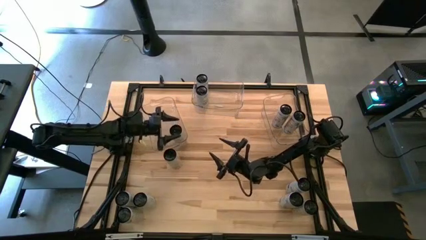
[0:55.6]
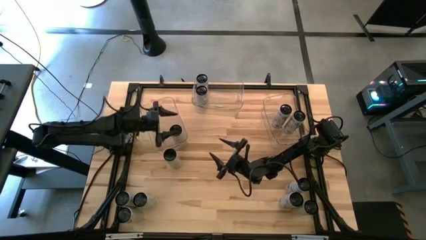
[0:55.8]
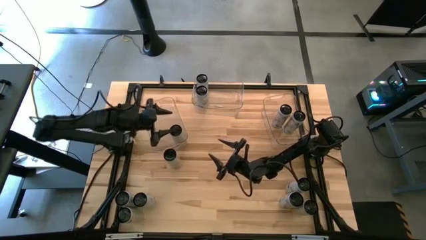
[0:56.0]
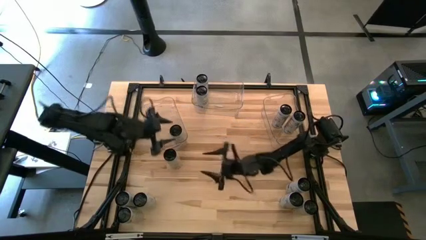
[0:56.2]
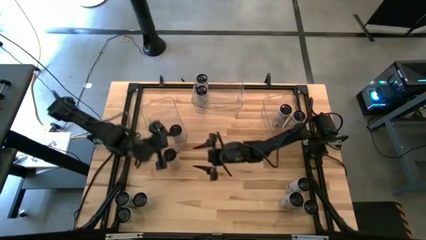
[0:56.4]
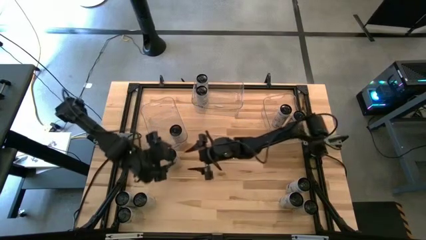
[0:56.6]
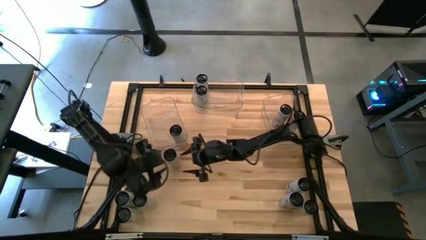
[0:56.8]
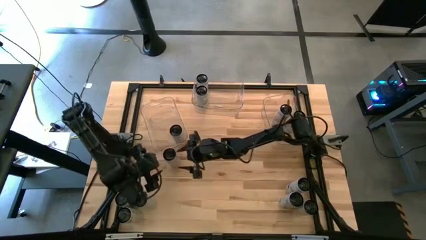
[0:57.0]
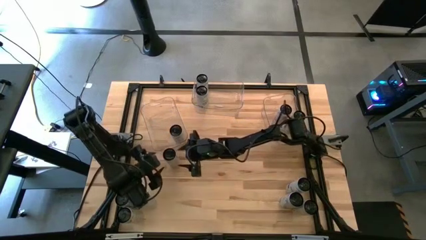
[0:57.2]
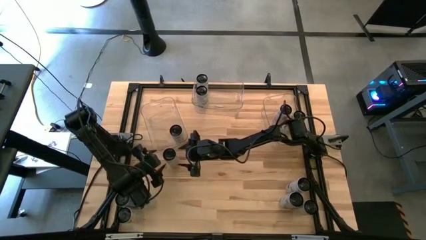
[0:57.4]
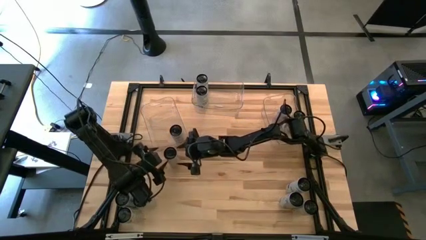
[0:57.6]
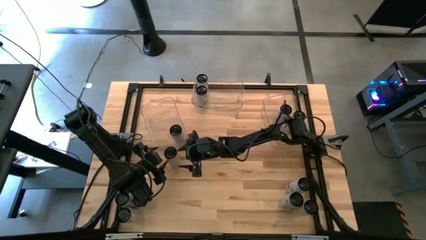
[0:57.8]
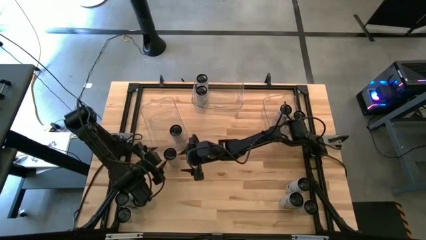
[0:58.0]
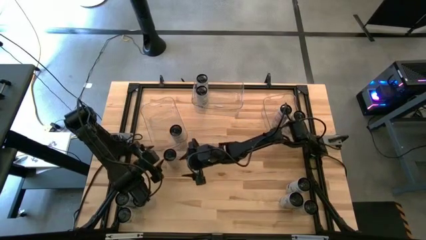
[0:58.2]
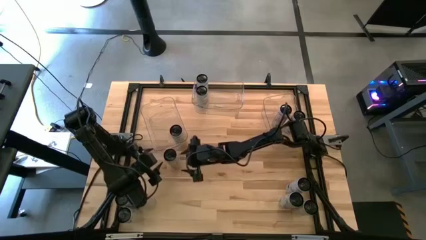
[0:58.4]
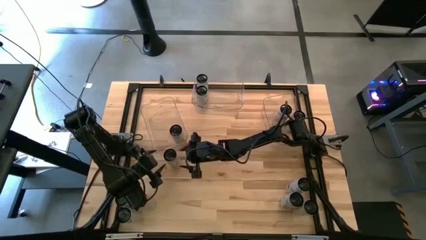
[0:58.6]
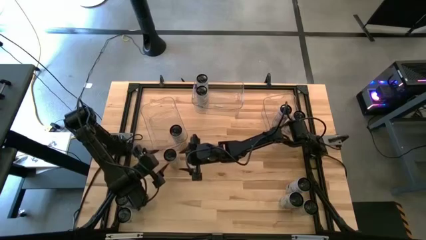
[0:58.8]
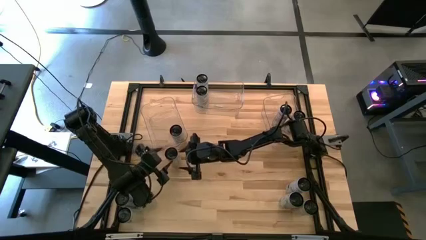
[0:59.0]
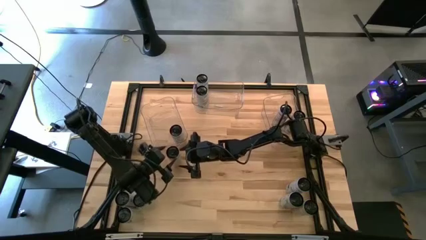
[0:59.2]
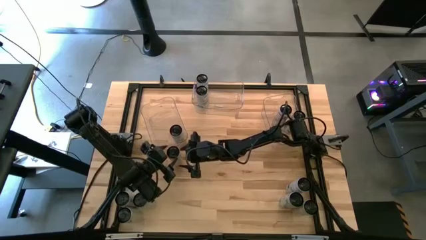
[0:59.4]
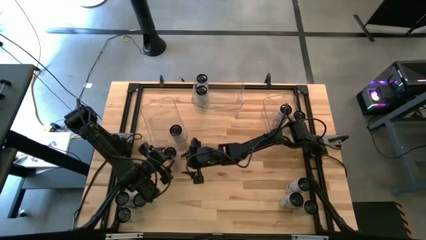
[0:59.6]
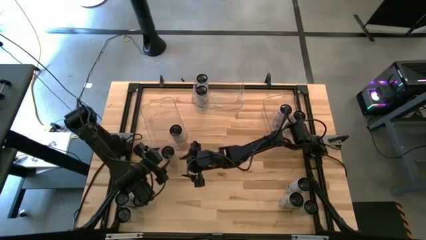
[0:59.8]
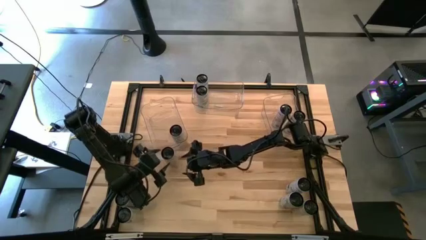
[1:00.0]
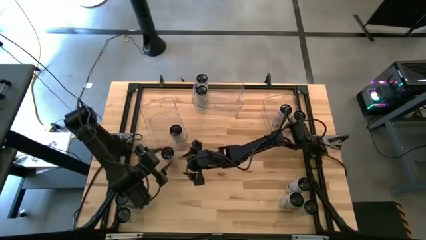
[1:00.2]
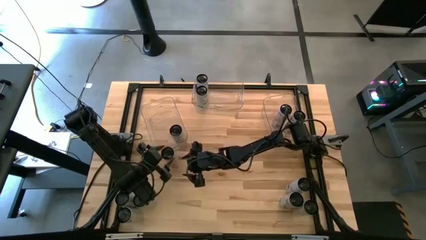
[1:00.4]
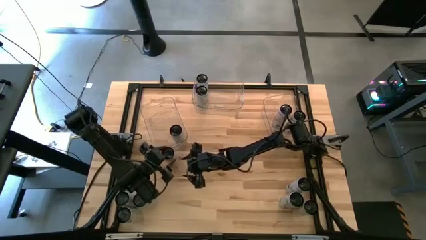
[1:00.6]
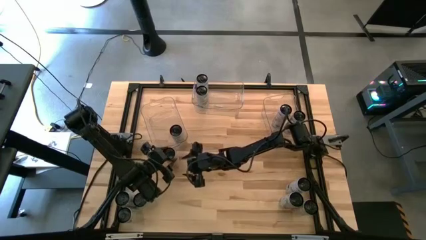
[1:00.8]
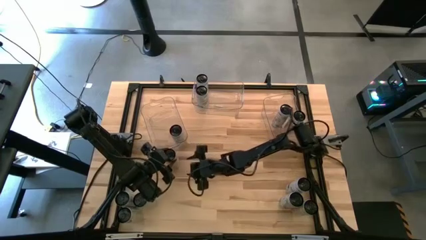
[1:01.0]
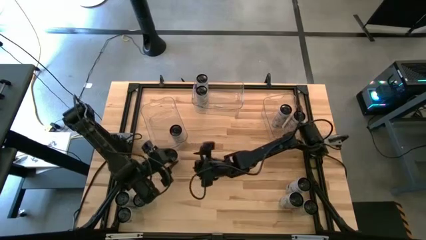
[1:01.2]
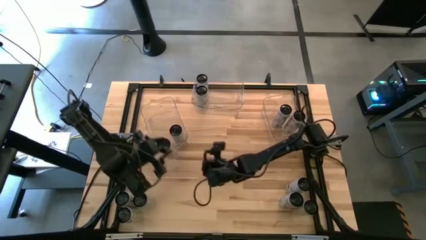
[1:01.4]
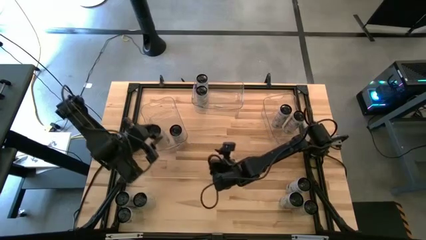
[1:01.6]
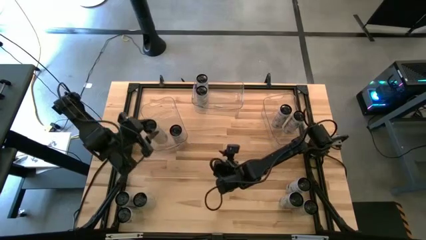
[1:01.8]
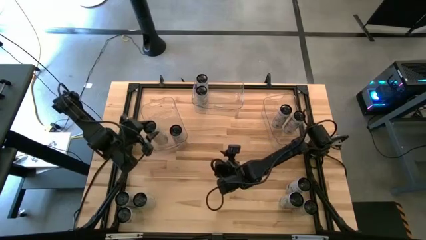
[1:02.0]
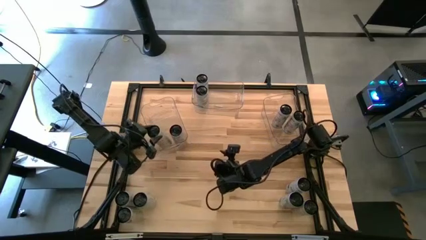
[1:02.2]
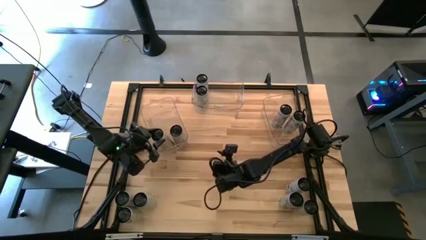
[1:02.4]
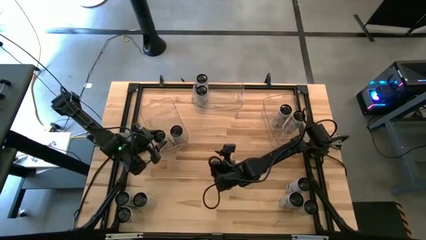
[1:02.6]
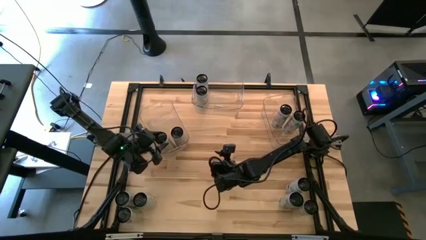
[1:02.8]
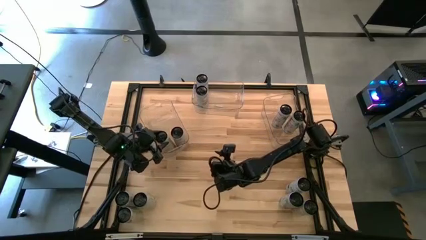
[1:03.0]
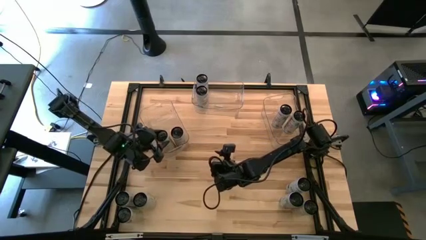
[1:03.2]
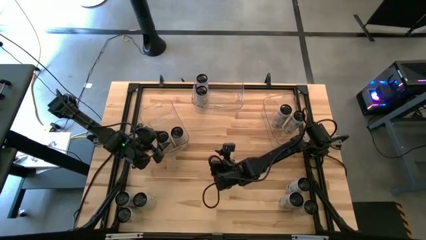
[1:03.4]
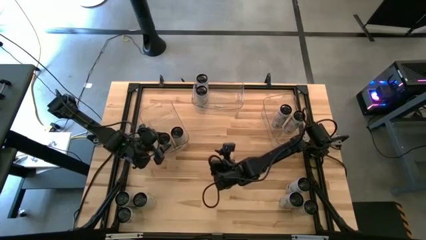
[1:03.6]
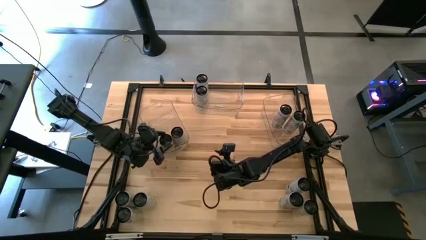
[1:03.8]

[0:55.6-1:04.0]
Task: Sort soda cans
Put the white/yellow soda can into the left transparent bin

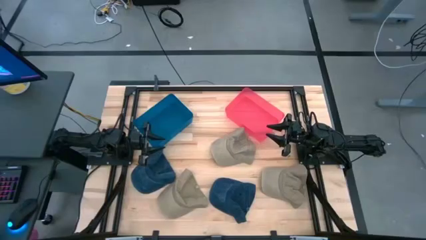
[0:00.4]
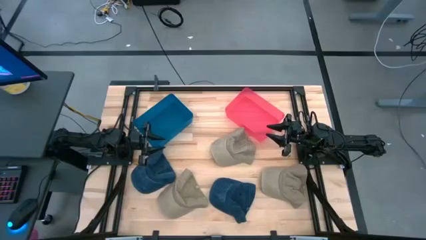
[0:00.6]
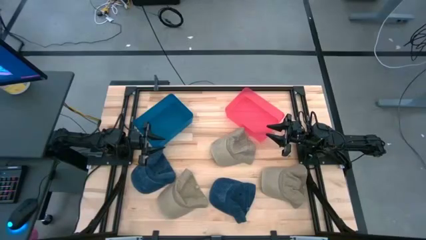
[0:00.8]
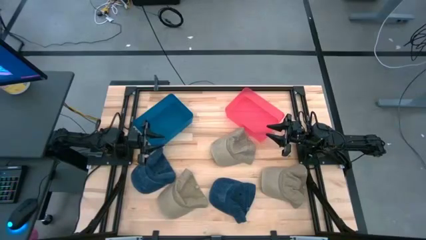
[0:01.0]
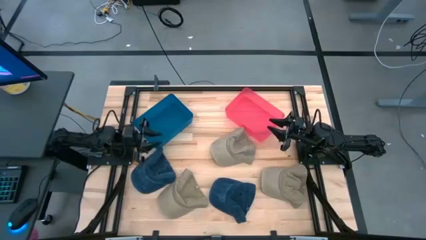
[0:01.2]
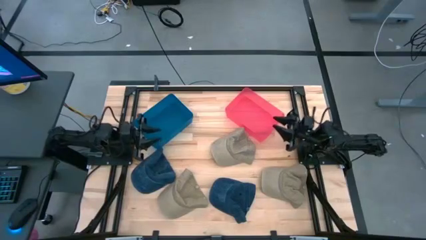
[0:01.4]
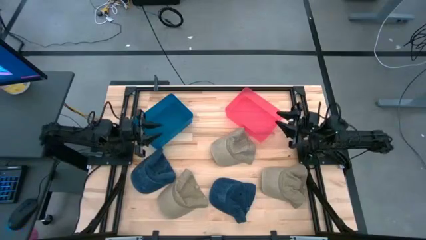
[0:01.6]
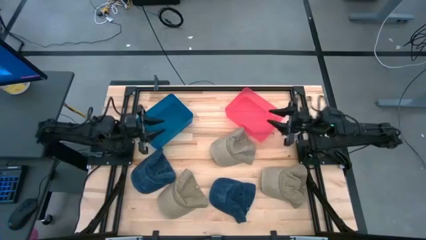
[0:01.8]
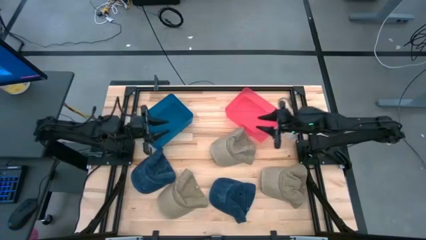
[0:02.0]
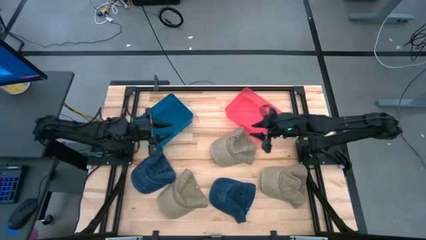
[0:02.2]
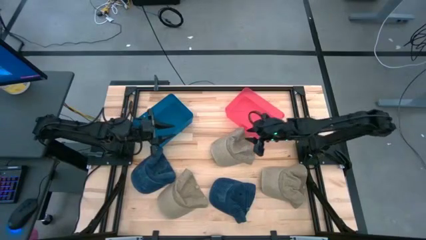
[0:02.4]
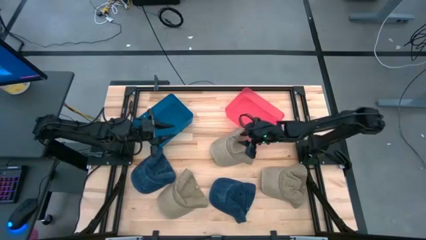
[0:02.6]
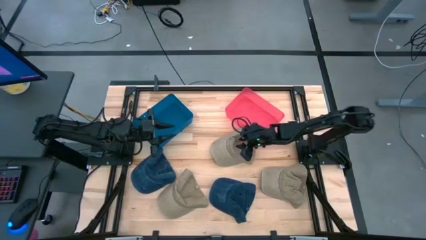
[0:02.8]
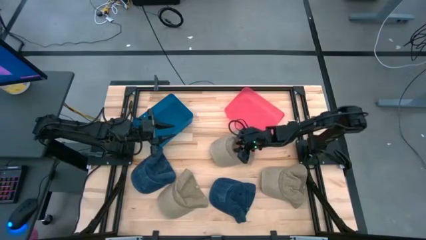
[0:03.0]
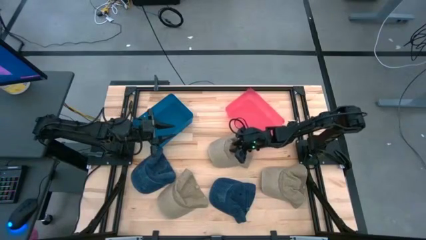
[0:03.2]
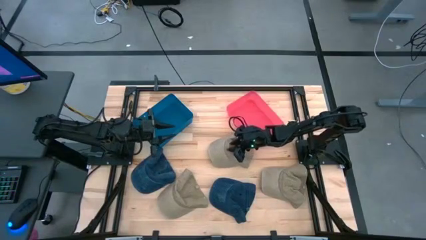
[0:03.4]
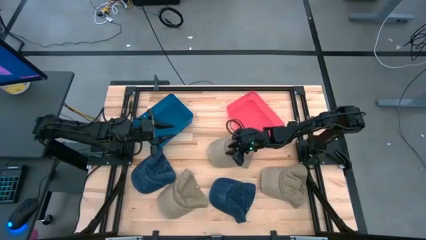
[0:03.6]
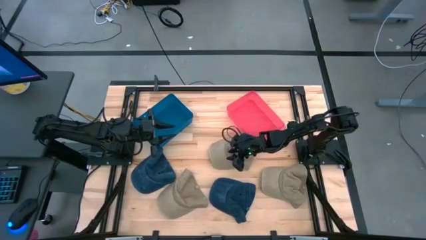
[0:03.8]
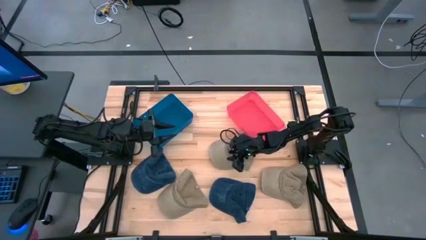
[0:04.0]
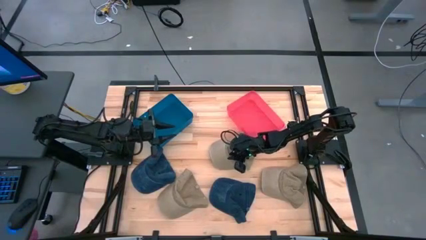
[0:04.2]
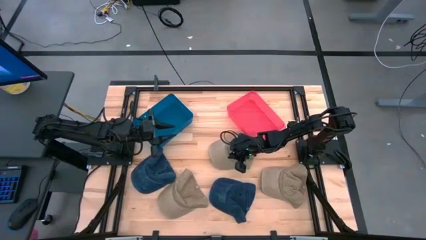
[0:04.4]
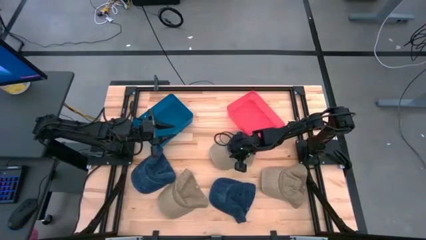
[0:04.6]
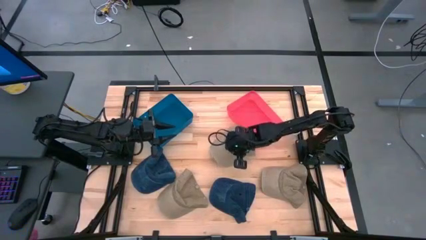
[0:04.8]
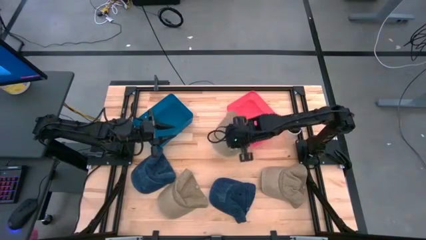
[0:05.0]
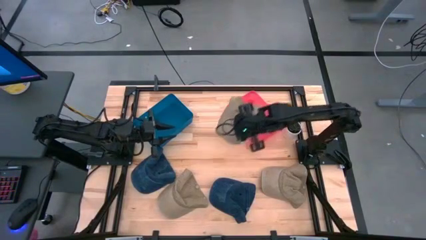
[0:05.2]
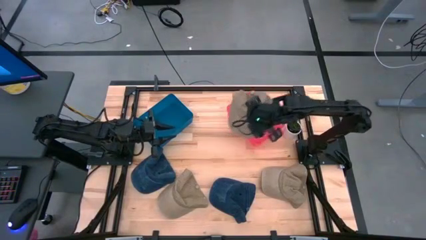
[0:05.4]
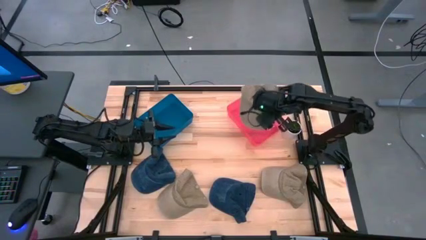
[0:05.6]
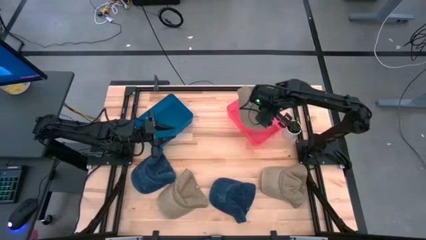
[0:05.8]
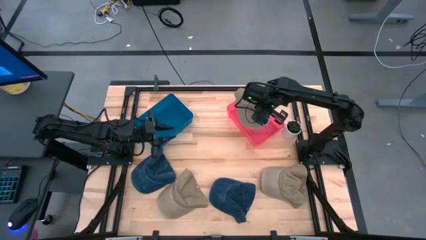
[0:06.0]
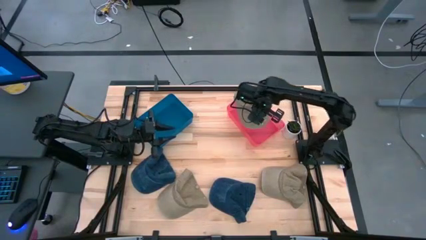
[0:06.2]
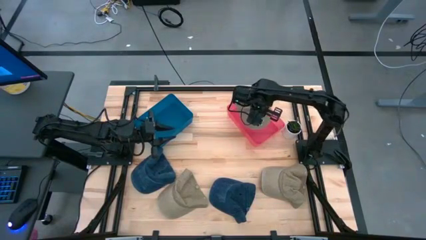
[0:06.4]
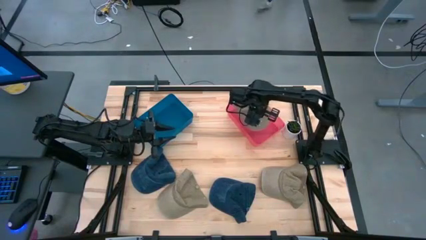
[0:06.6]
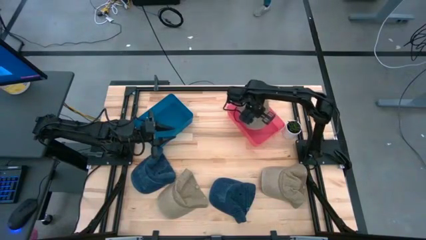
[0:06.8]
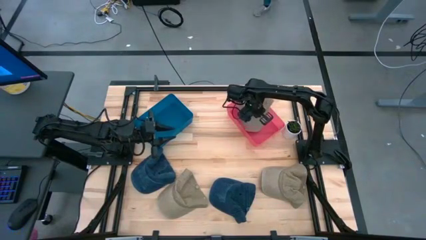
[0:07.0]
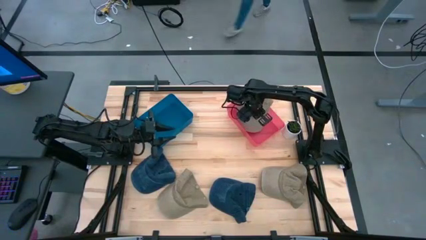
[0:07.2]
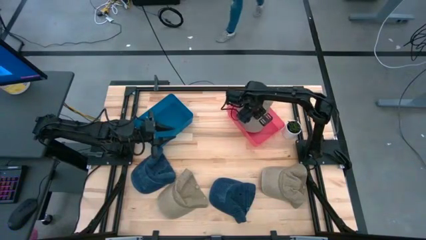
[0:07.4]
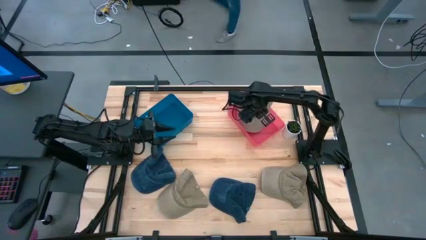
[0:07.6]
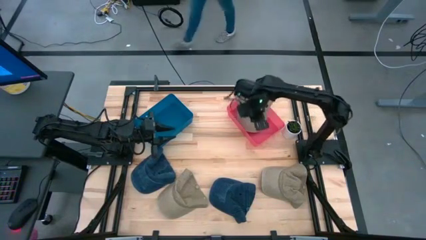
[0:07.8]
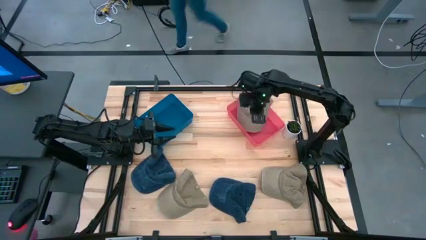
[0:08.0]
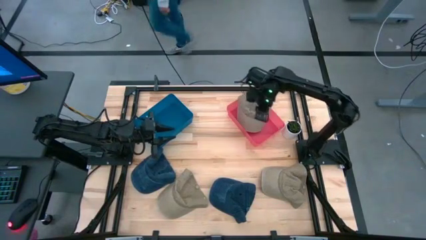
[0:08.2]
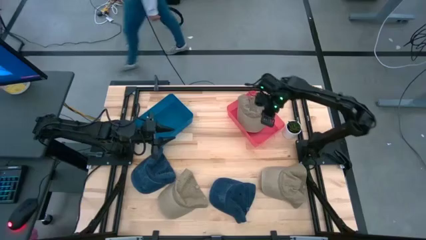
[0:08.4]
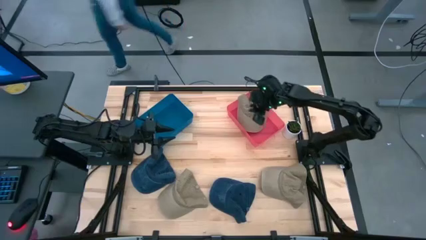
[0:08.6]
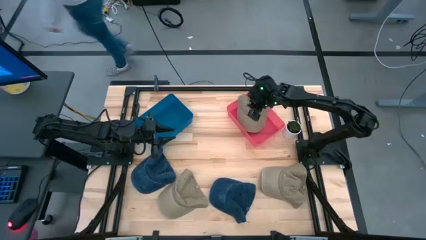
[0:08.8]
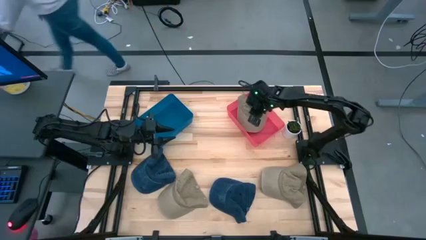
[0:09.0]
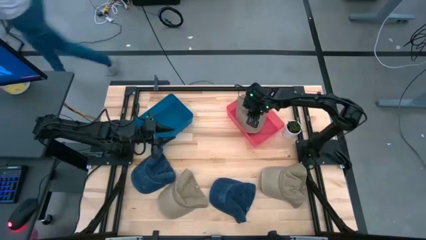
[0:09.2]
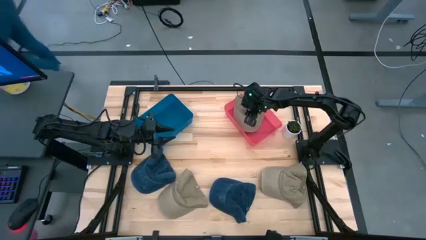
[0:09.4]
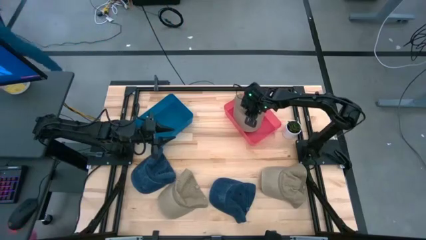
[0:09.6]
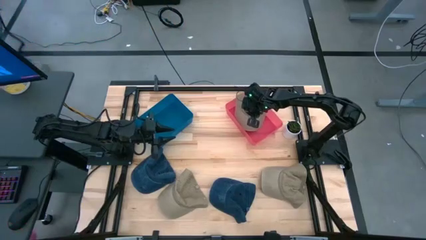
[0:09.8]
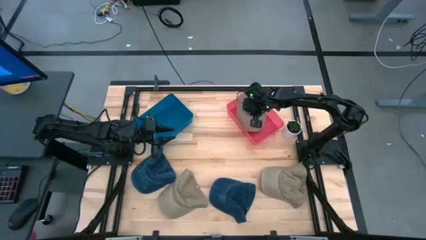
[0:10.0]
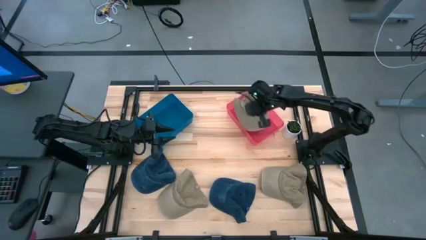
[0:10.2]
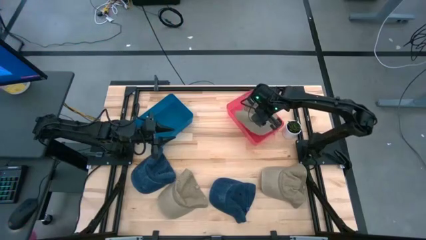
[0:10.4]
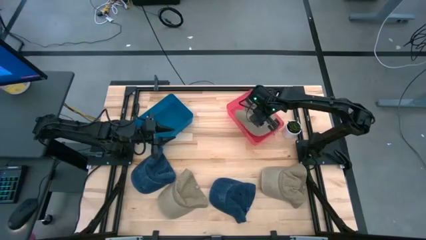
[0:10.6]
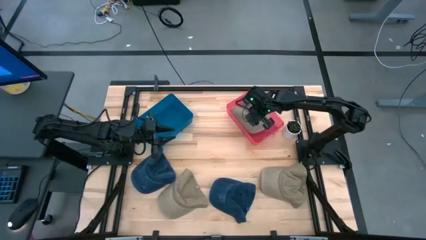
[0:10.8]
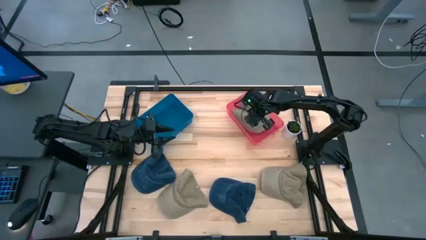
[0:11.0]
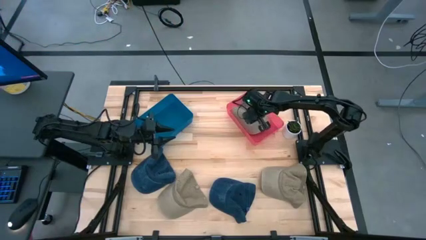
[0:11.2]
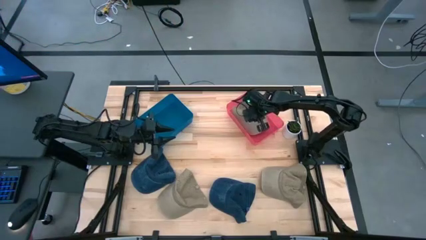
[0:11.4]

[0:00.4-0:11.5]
Task: Pick & Place hat
Put the top brown cap into the red bin
